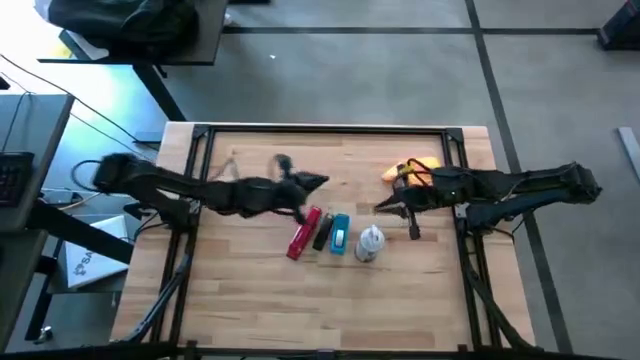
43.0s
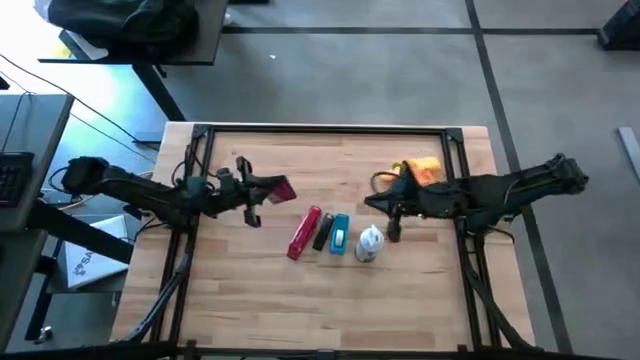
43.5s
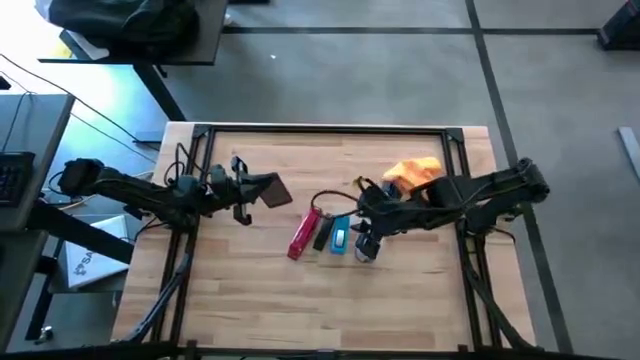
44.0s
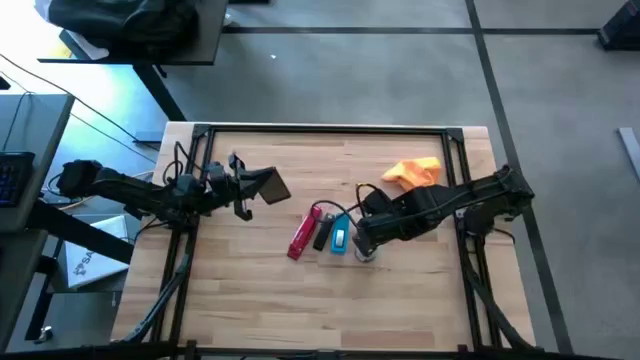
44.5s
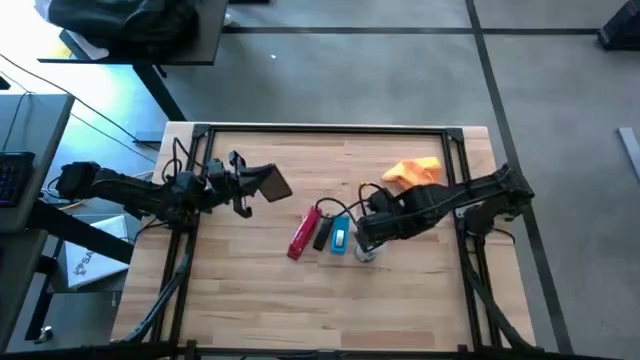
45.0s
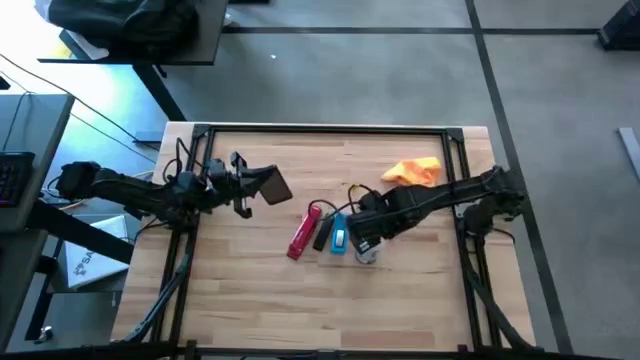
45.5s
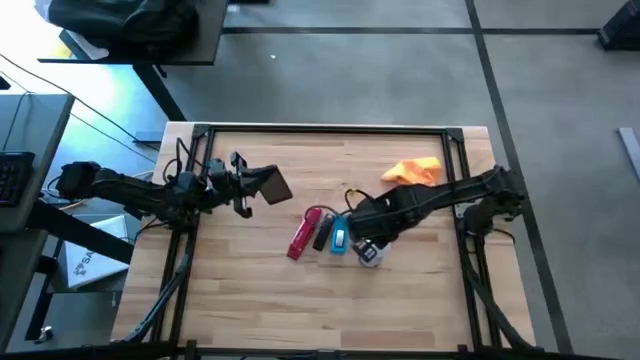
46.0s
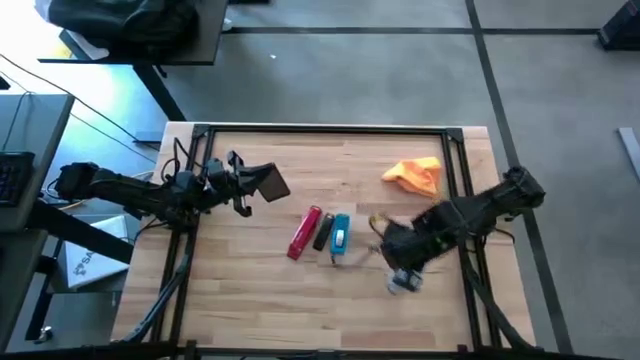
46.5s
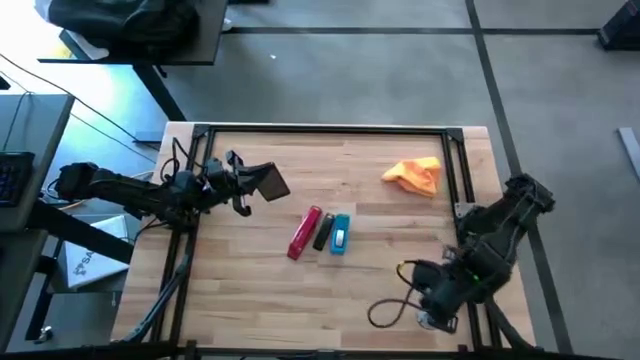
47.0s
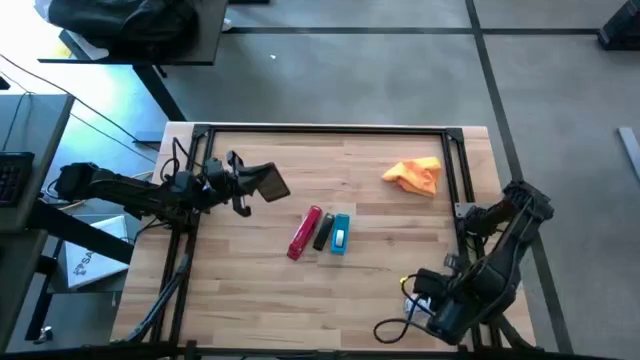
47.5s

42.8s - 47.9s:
Task: Apply microfiber cloth
Move the white spray bottle to the bottom right of the table

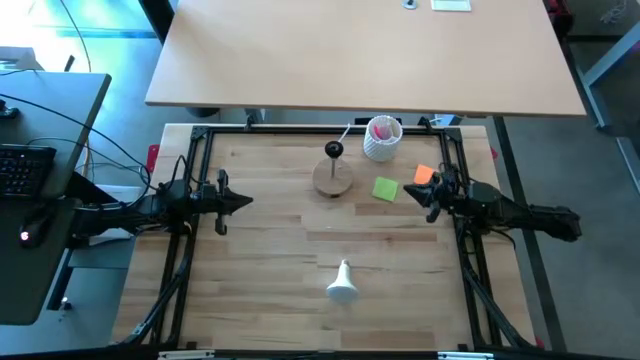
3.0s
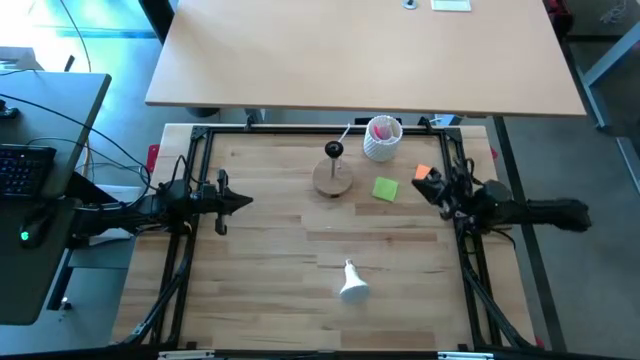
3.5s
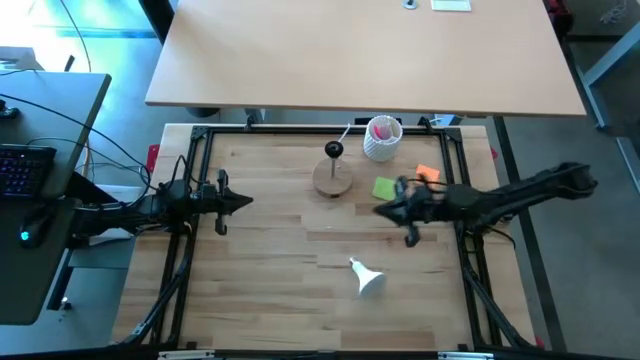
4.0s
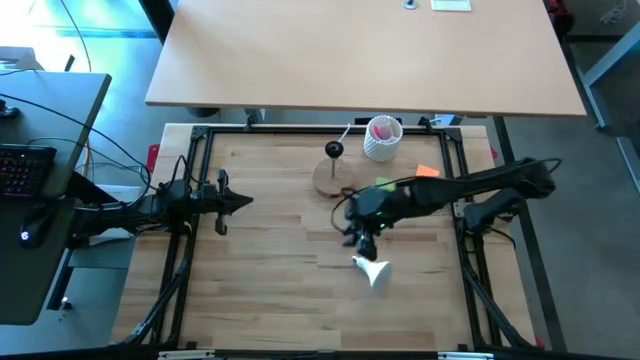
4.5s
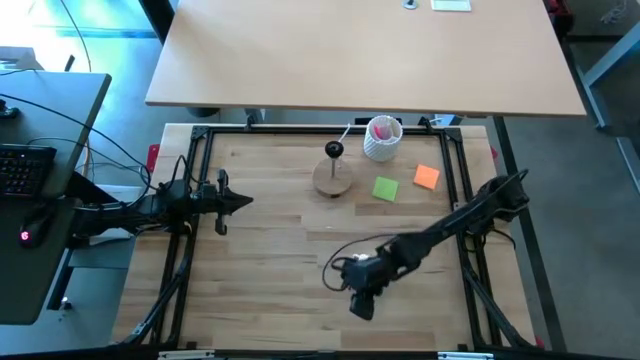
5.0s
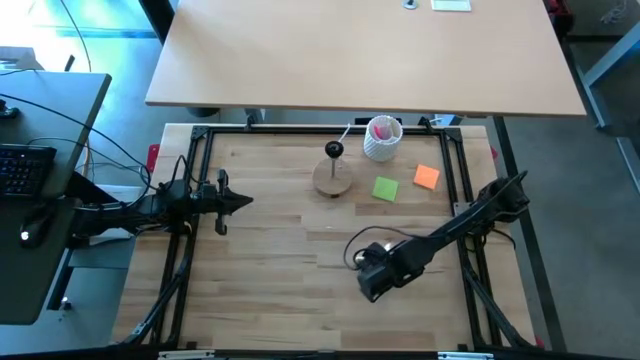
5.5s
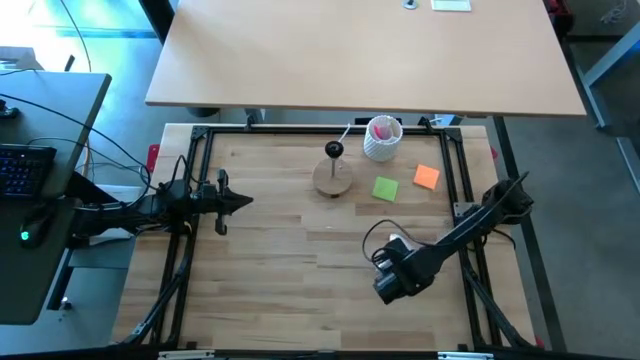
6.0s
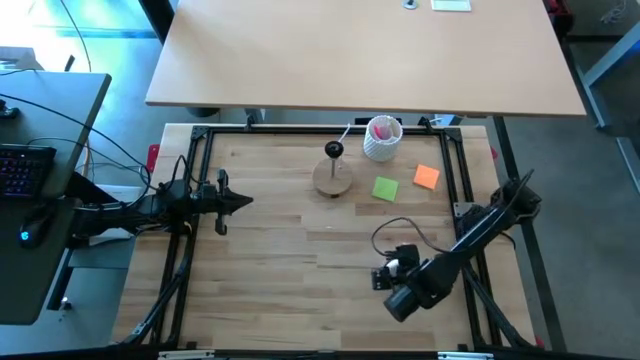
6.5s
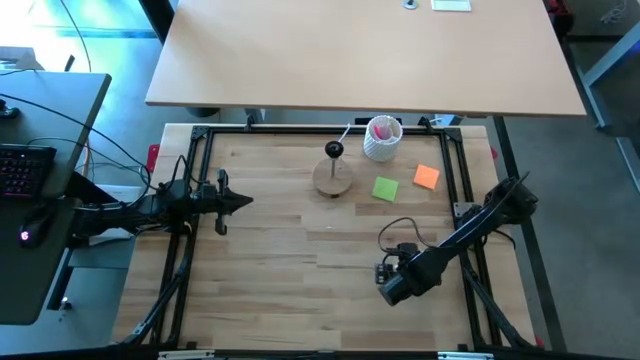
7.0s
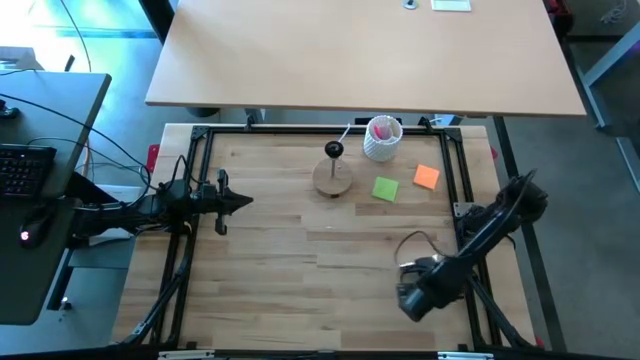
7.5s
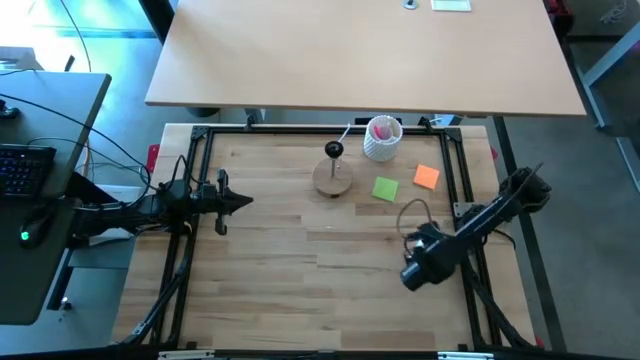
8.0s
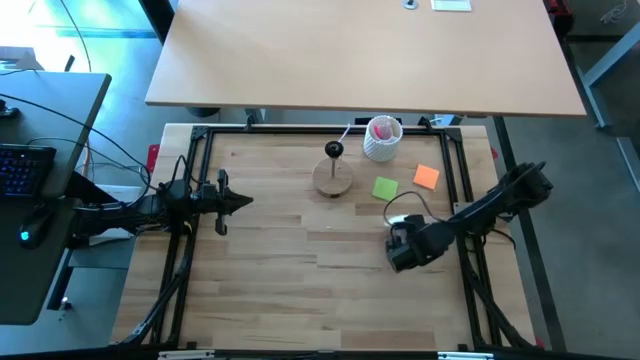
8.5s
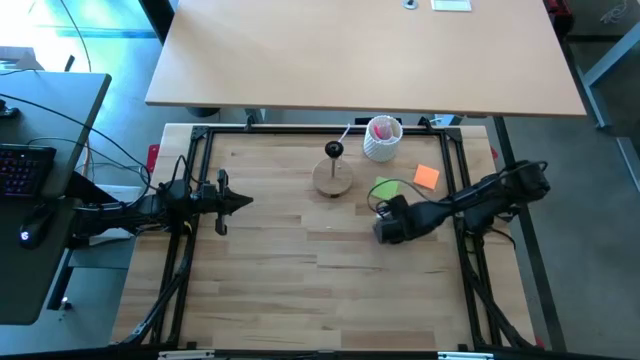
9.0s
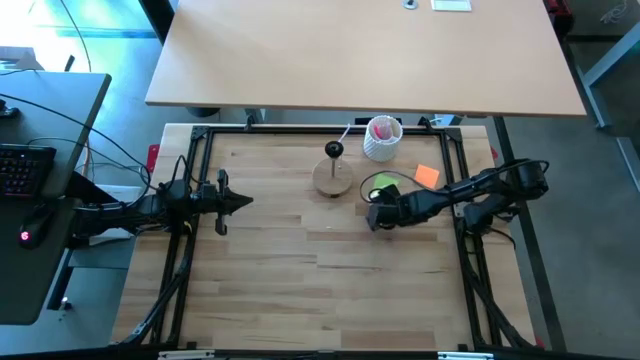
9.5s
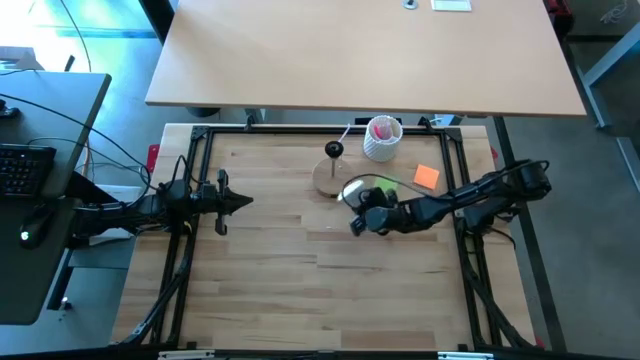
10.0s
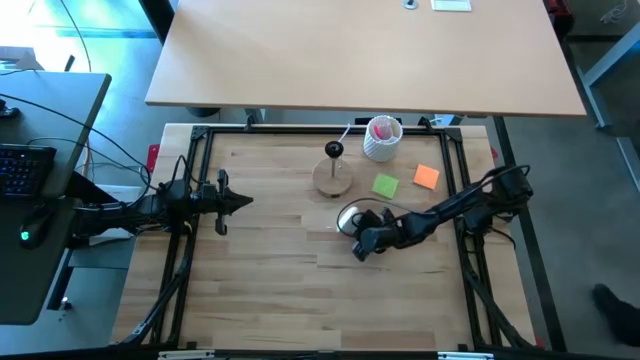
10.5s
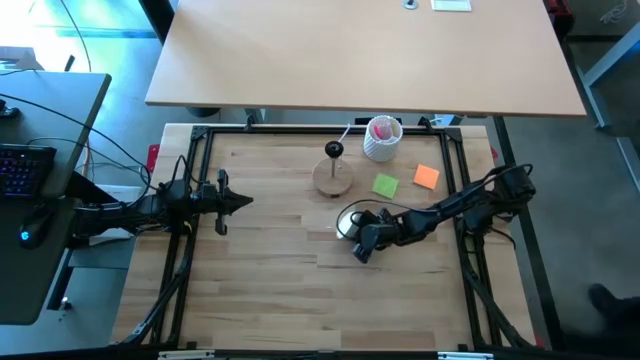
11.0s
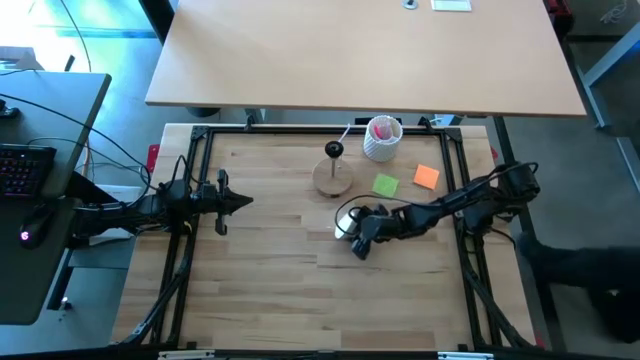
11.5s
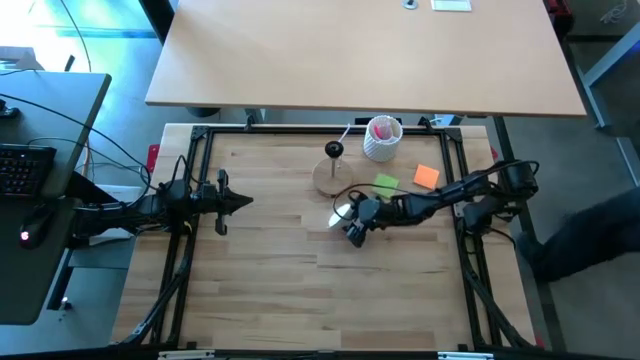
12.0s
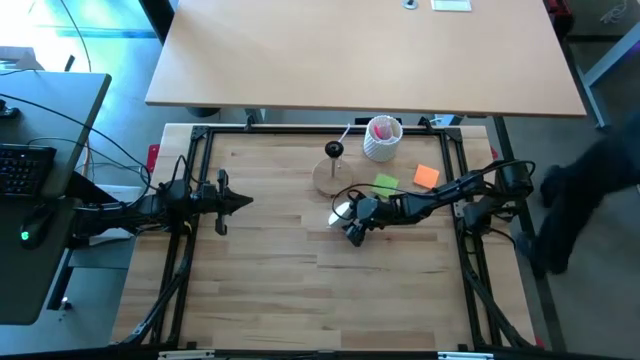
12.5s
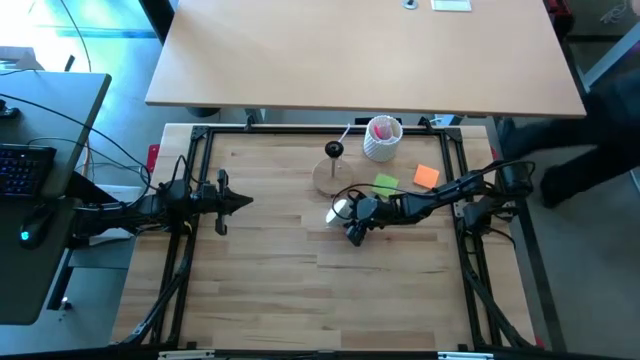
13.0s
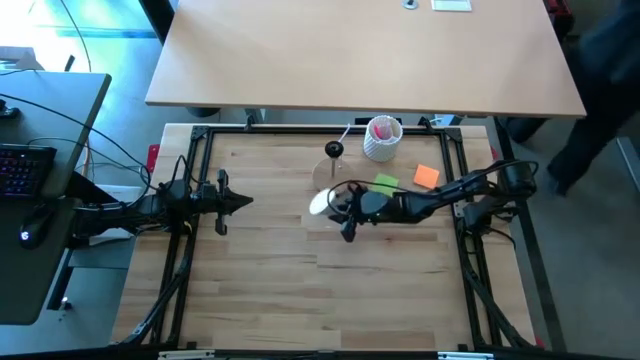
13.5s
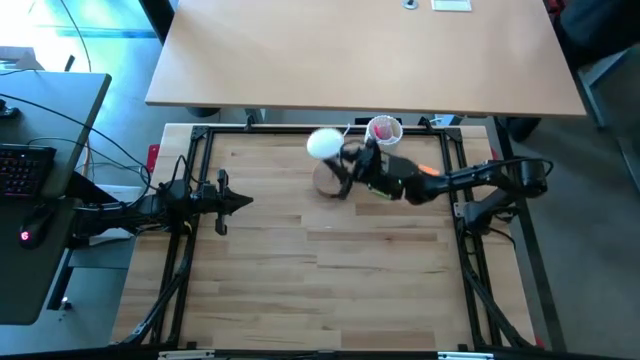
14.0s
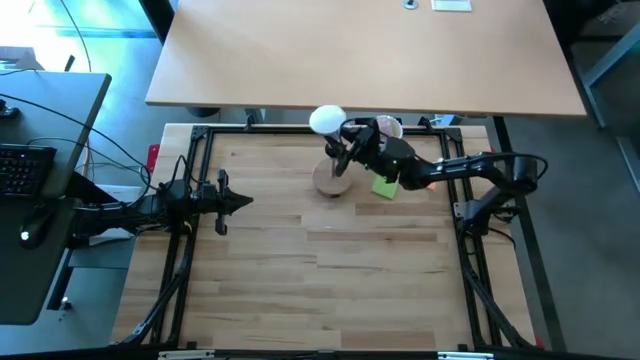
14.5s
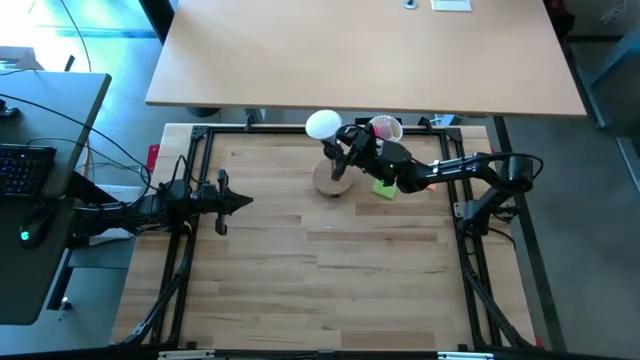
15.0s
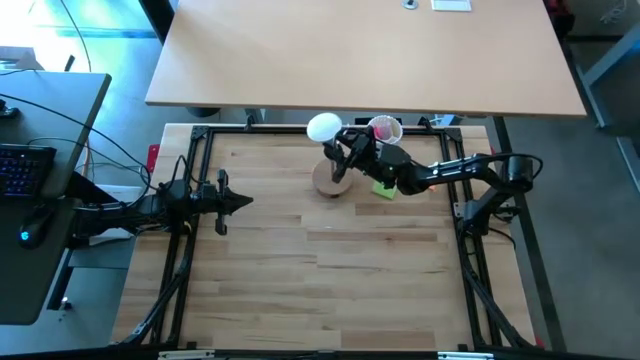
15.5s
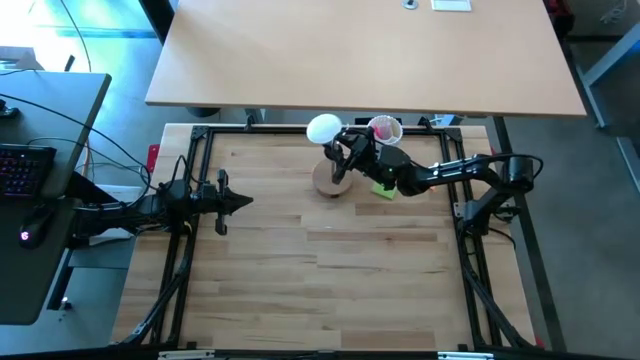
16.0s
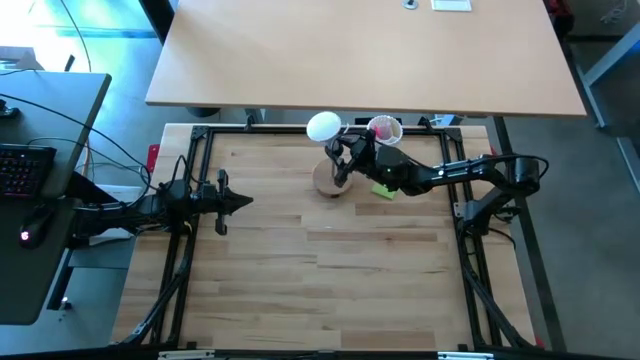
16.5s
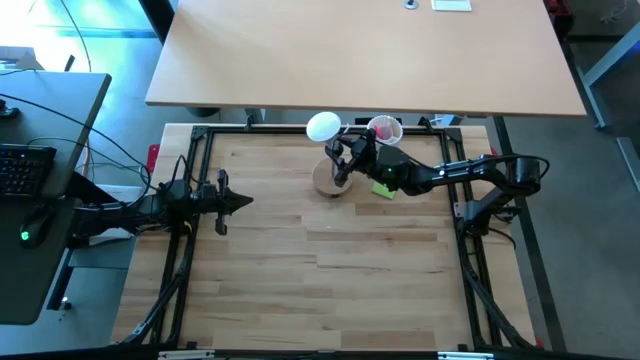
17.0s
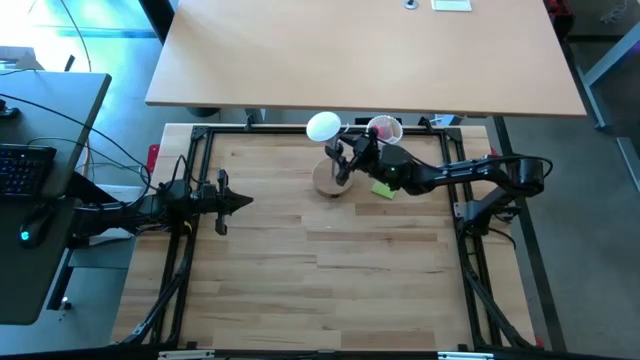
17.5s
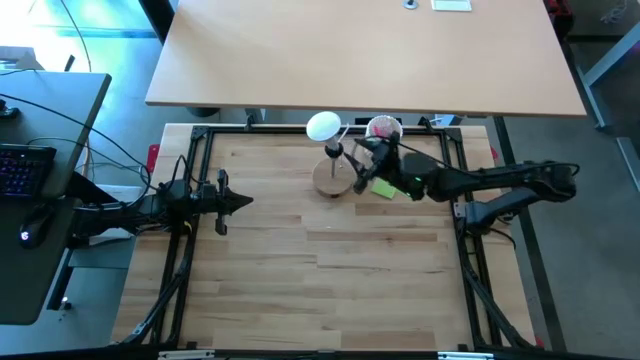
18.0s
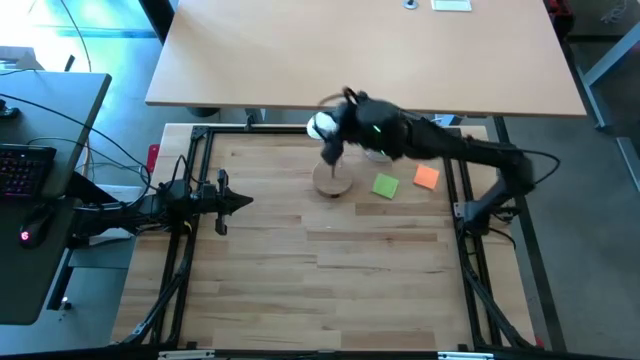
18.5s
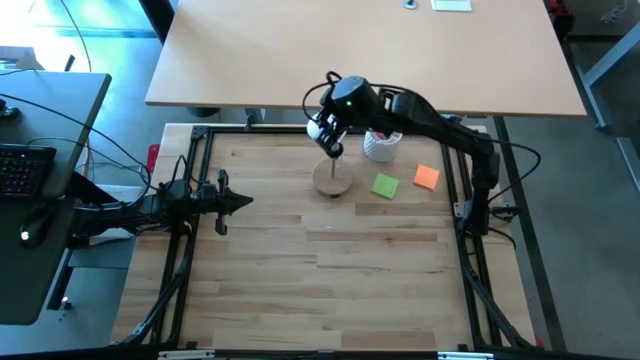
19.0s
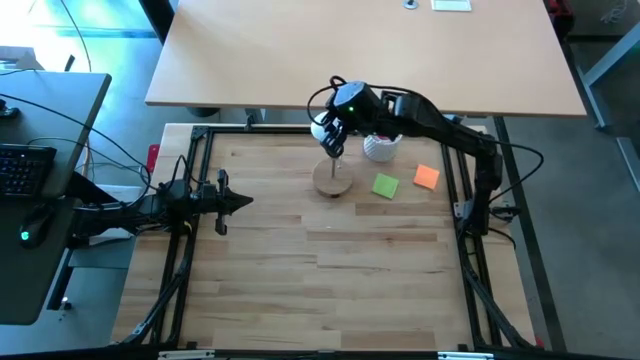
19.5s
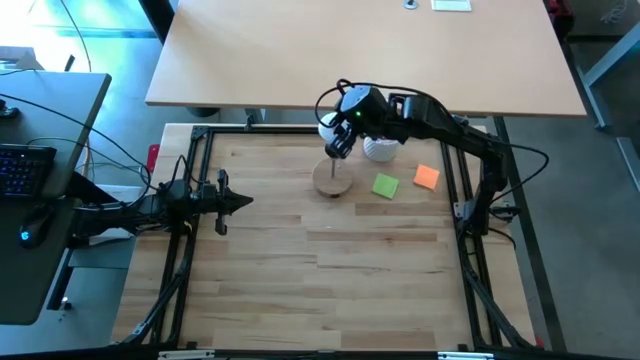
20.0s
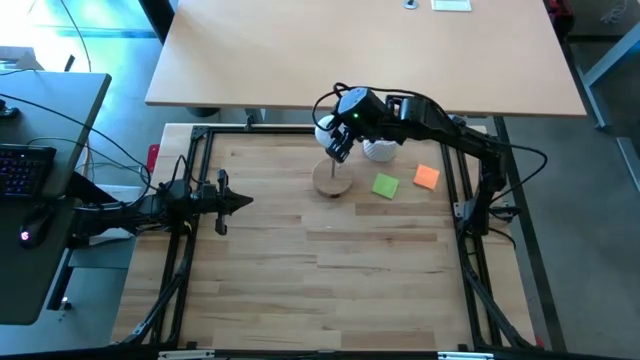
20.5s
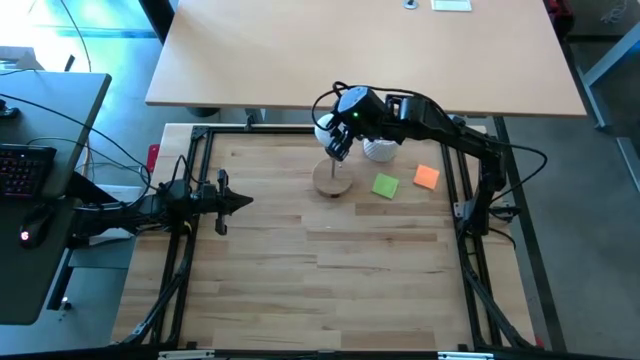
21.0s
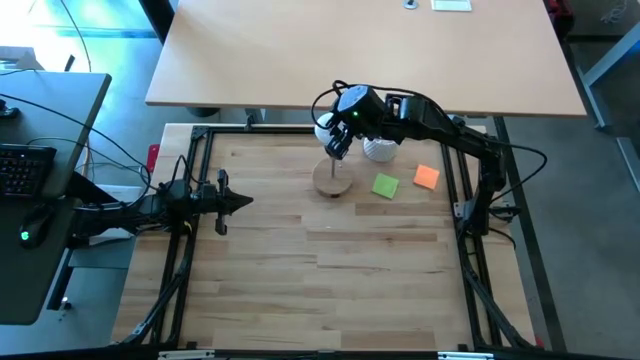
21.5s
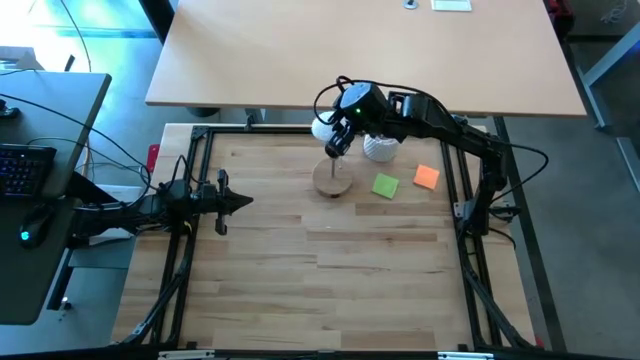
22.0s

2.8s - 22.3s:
Task: Screw lightbulb
Insert the lightbulb into the lamp socket
